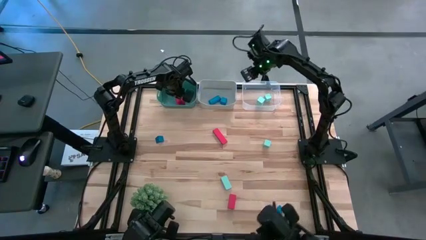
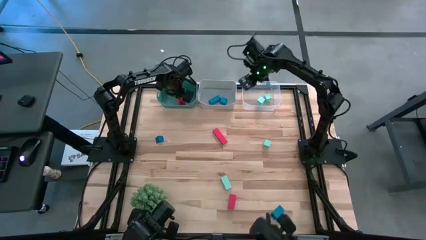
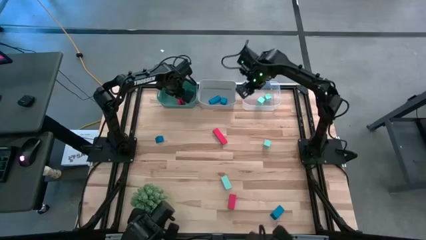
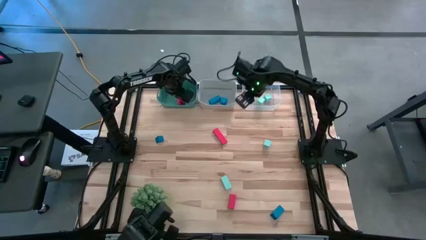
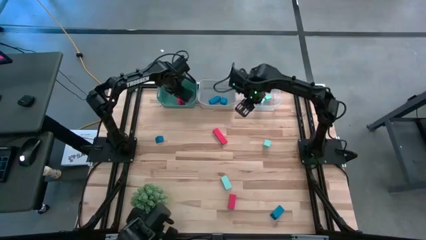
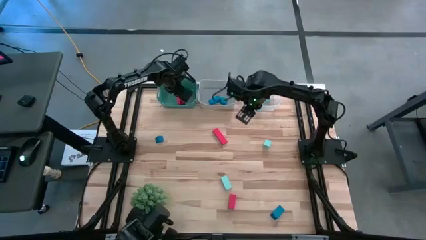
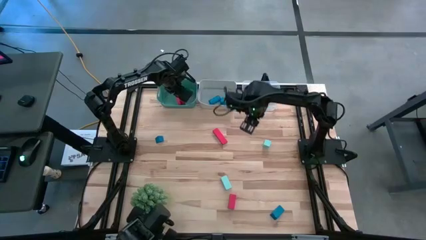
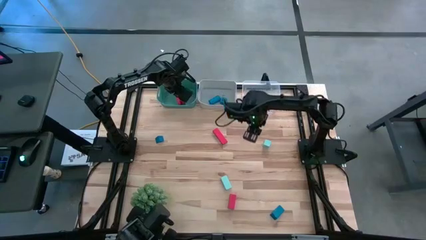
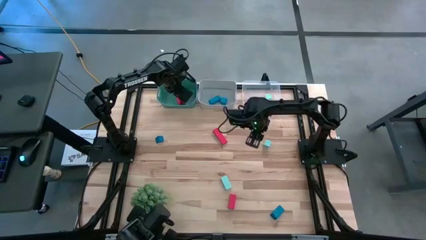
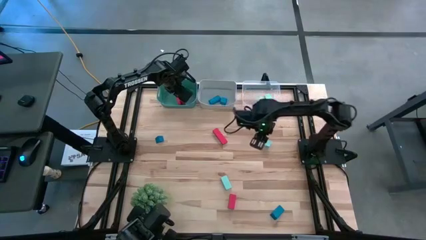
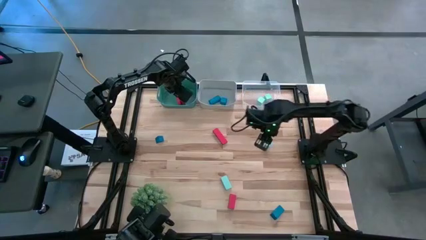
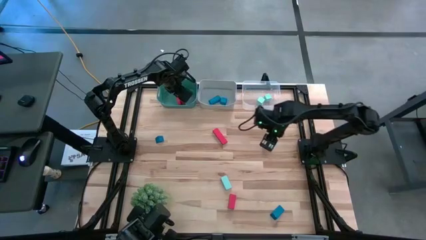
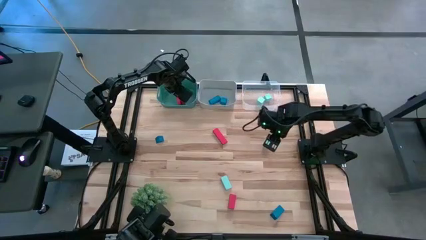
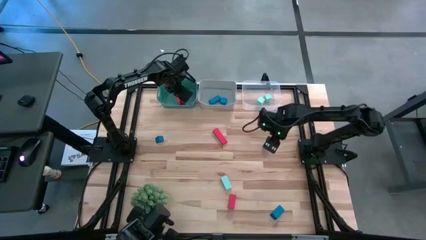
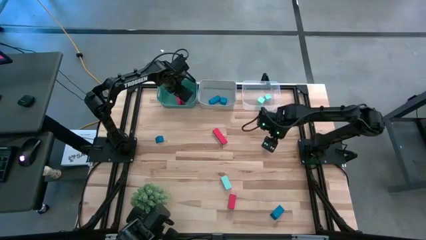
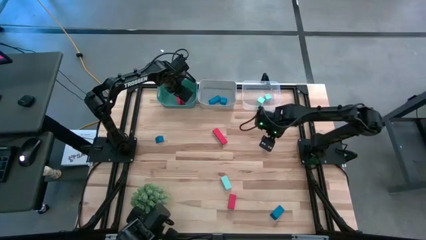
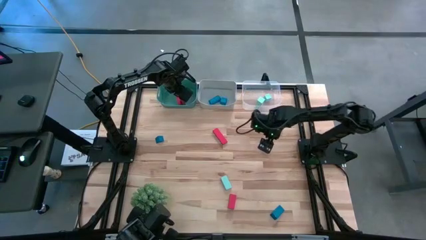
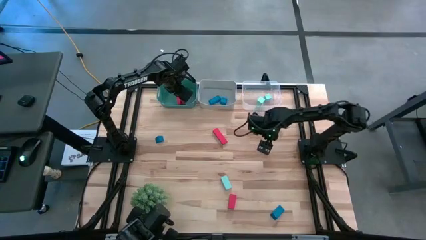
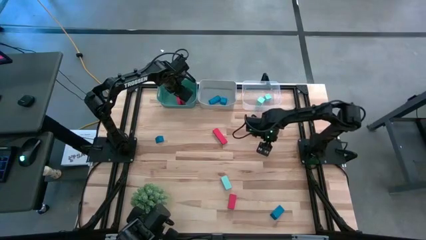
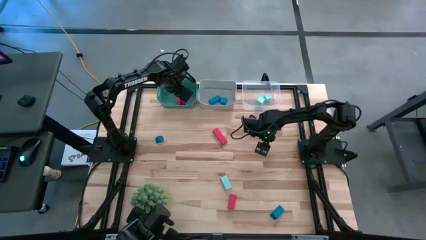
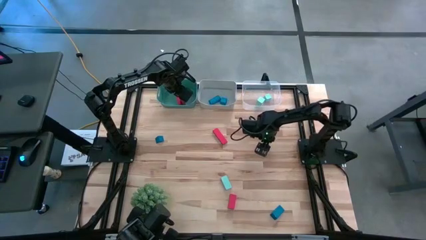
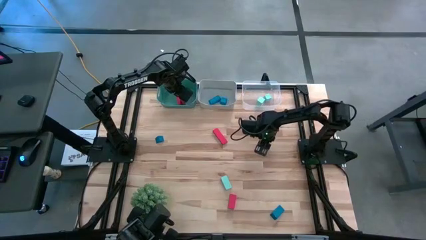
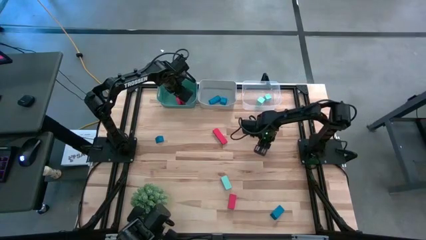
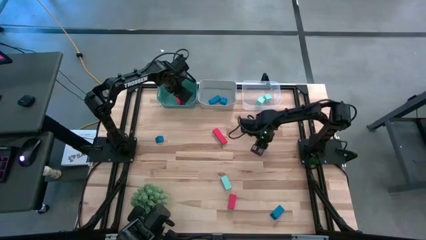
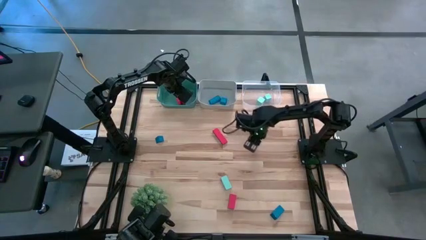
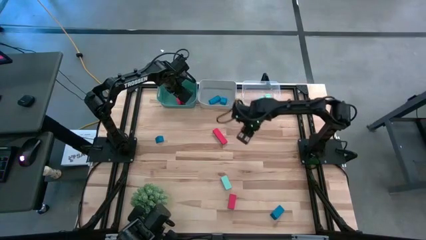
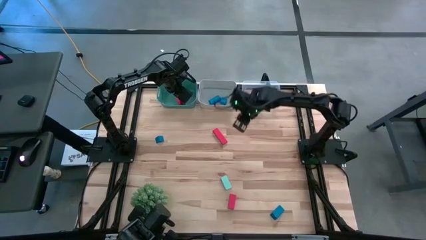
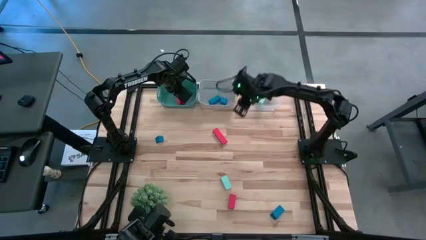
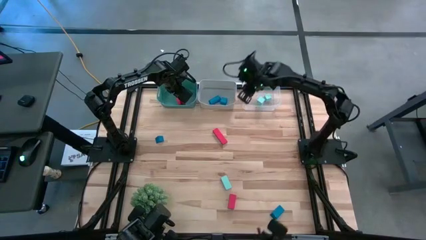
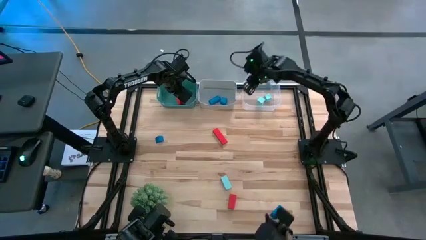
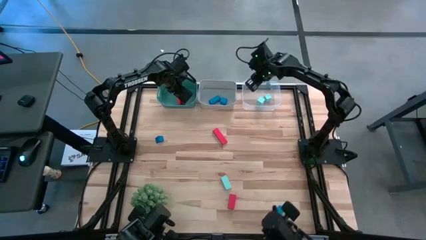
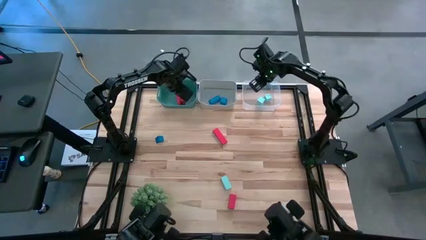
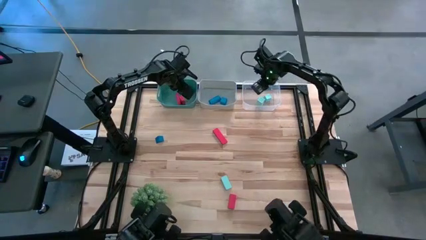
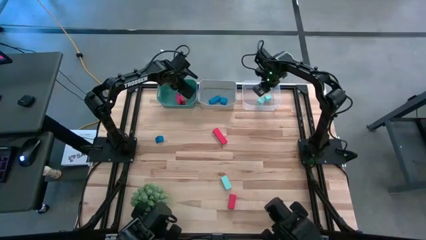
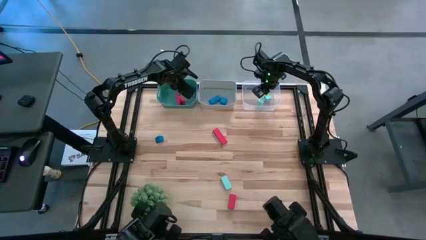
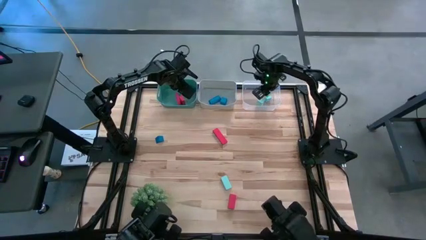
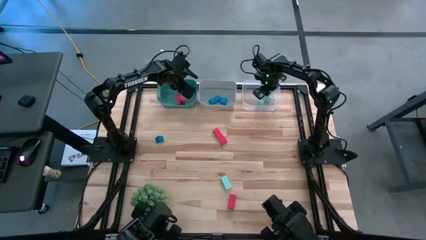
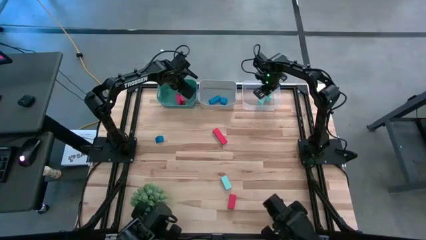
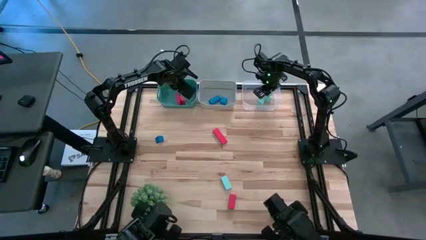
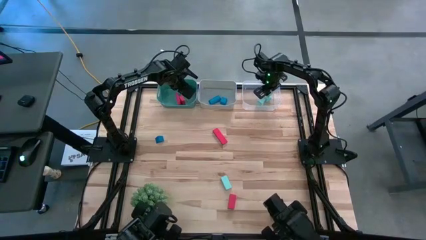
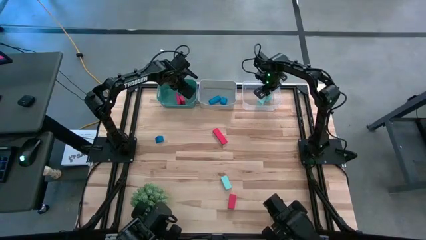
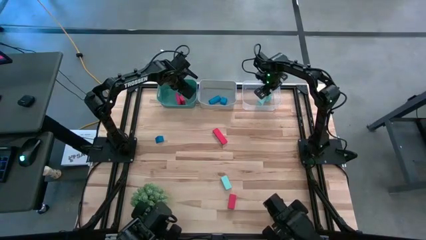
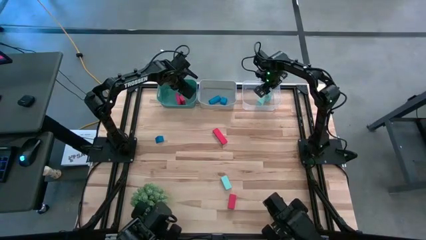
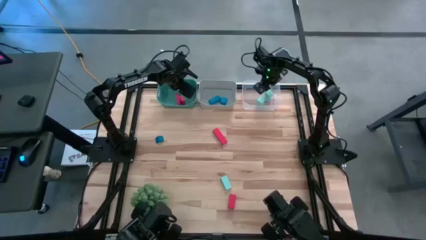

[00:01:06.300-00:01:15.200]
Task: Sort & place blocks by color
Put the light blue block into the transparent bin

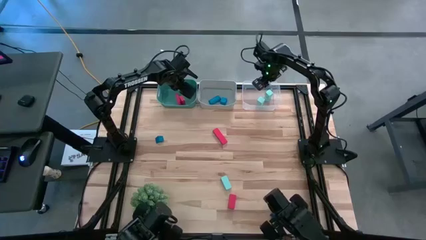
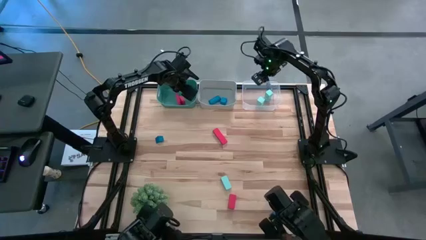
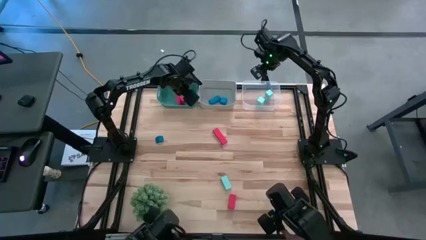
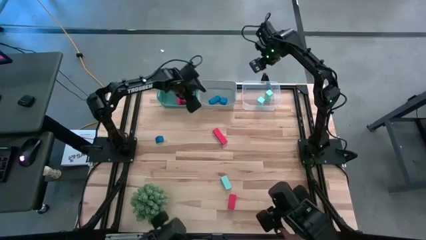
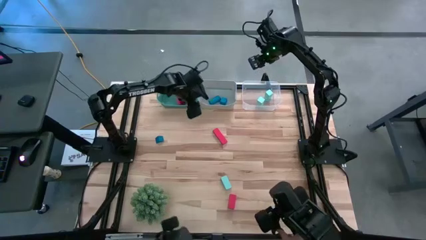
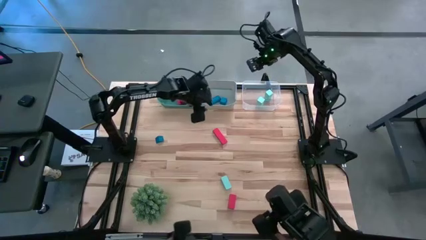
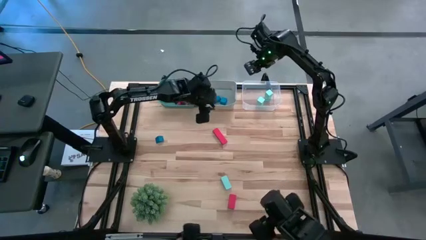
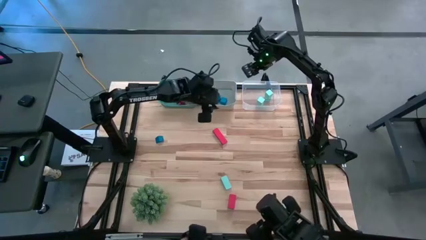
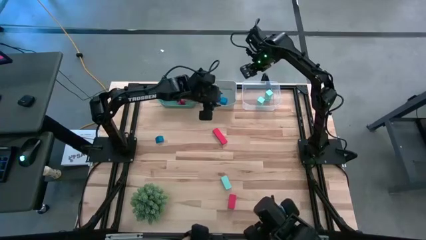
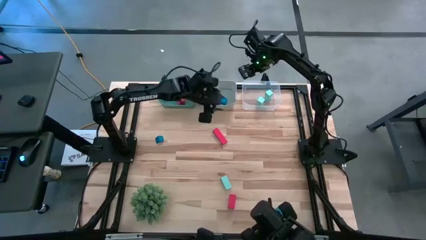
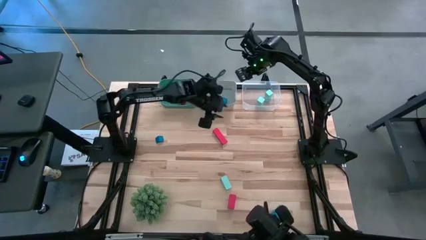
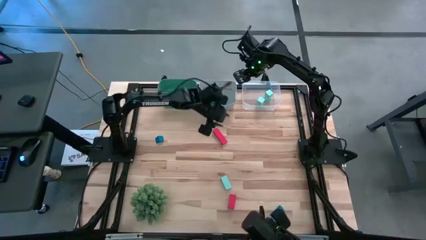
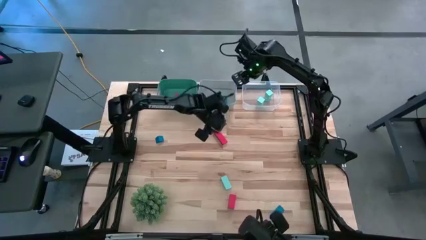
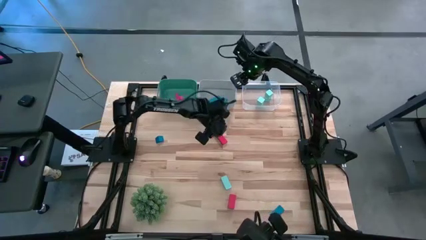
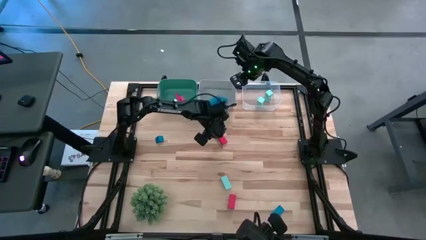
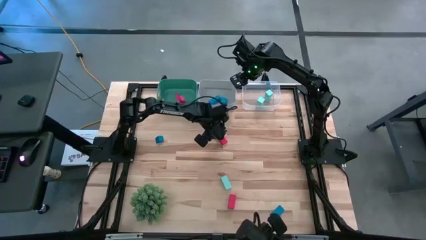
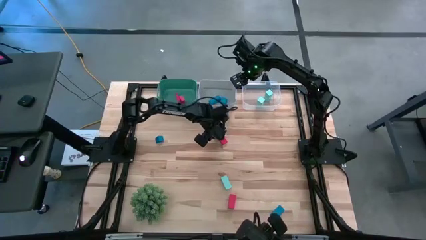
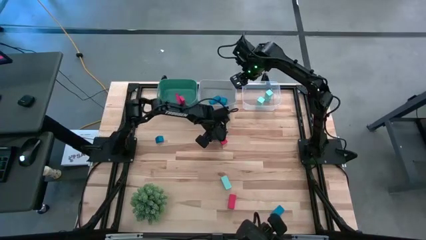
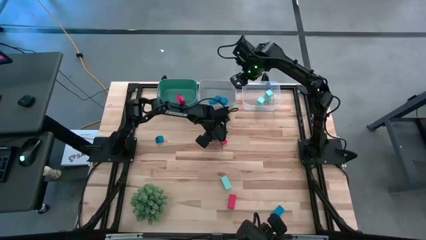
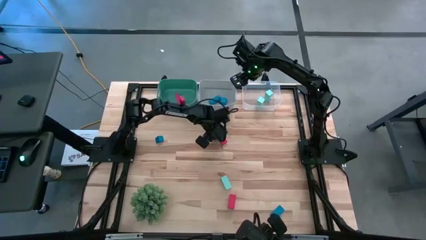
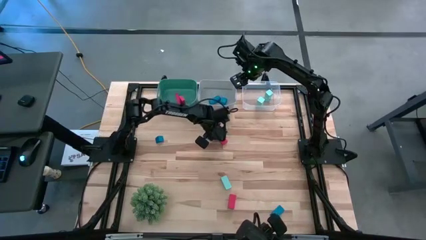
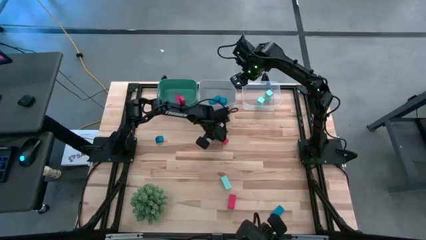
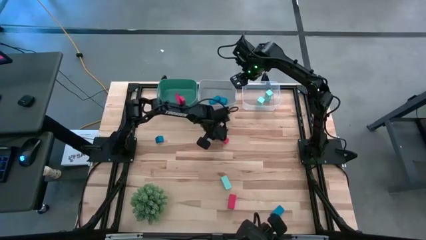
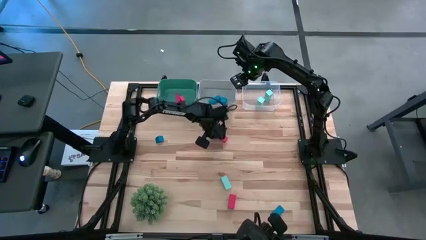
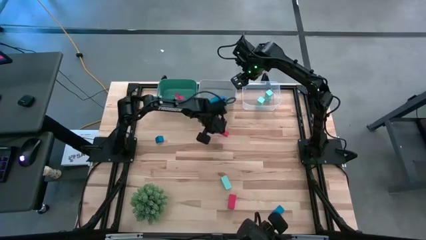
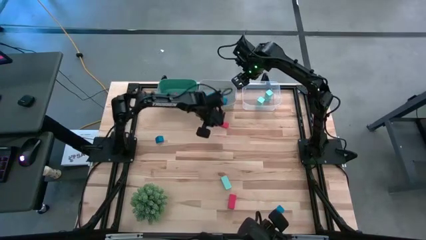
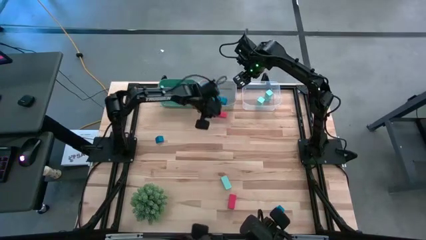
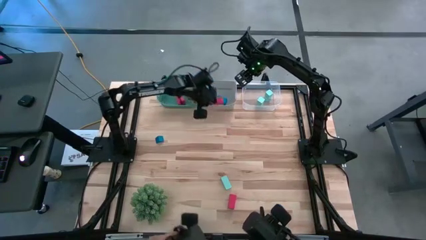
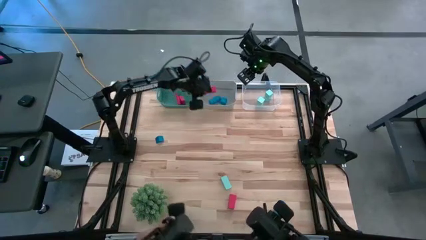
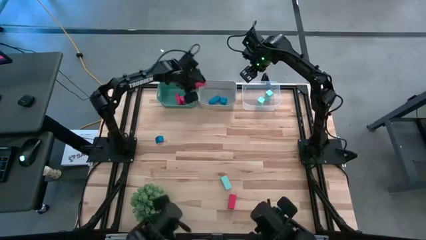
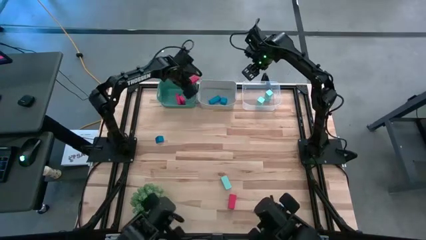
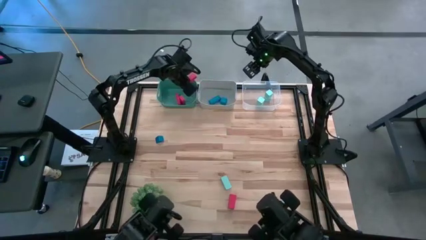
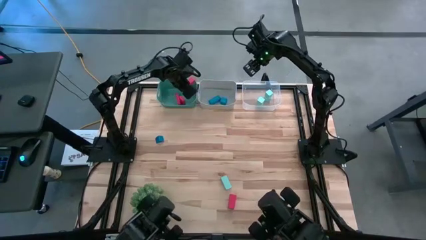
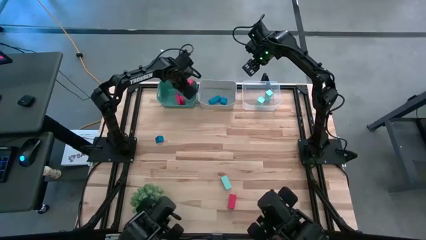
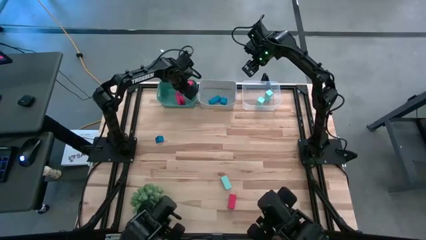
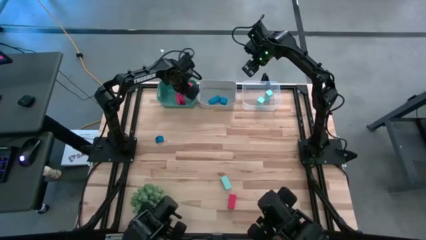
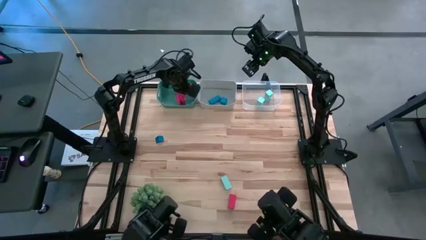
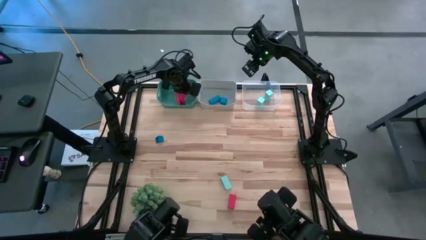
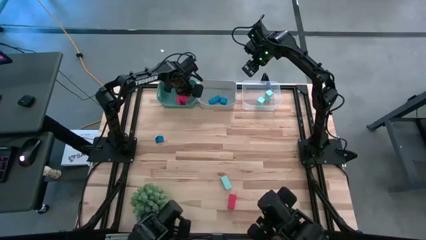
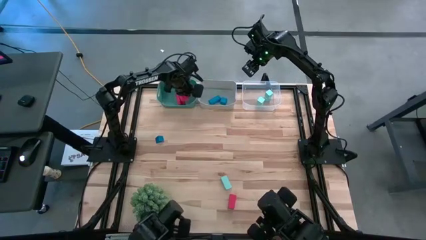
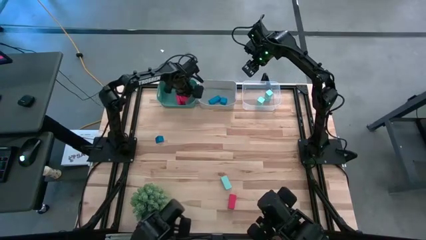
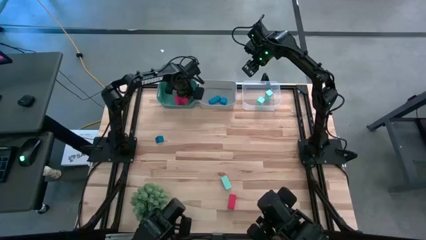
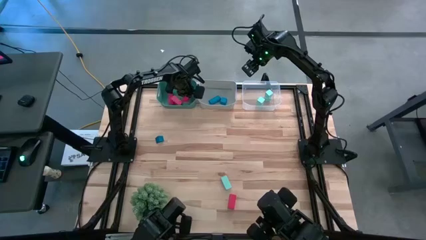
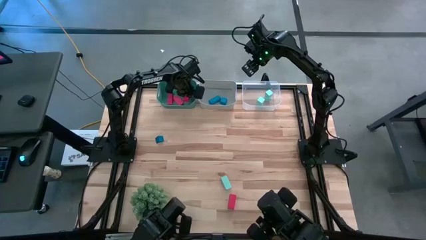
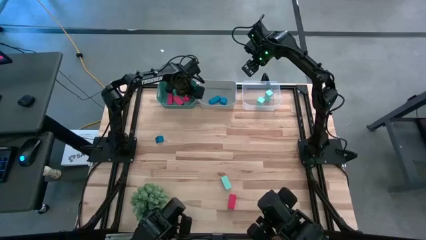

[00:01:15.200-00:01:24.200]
Put the red block into the green bin
